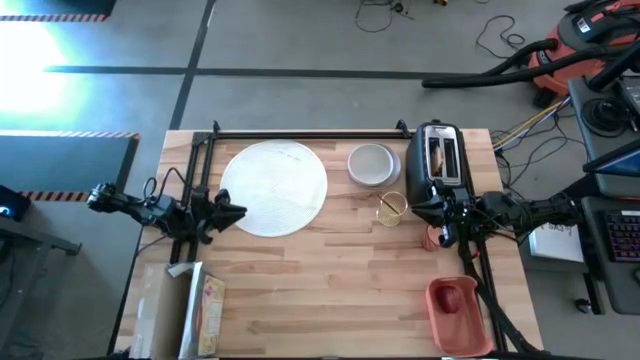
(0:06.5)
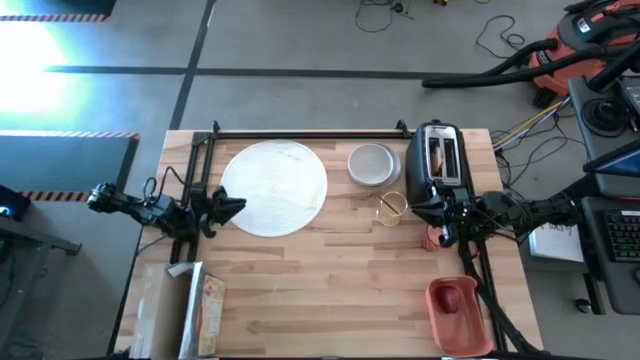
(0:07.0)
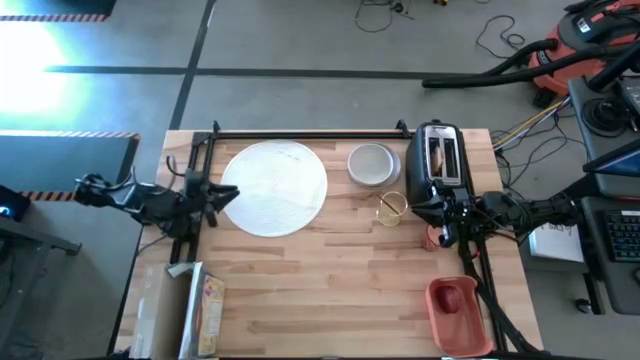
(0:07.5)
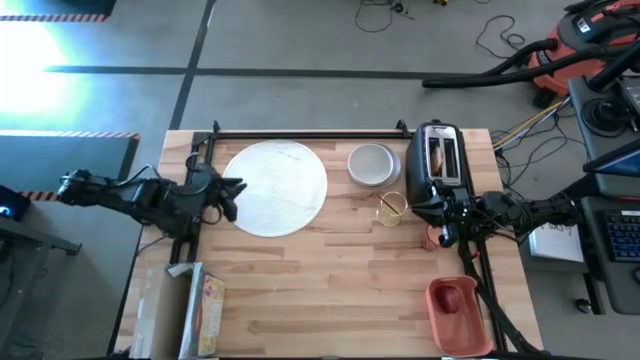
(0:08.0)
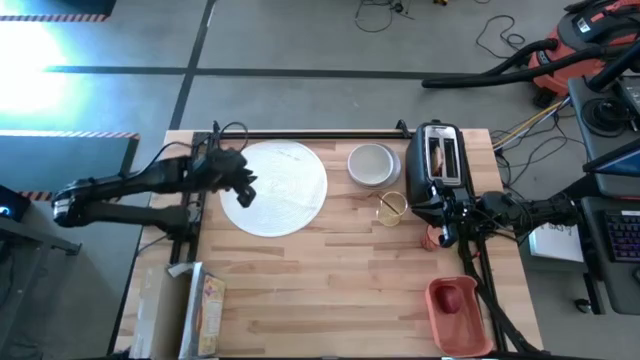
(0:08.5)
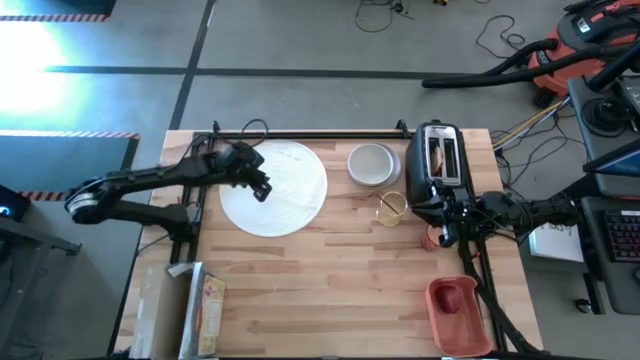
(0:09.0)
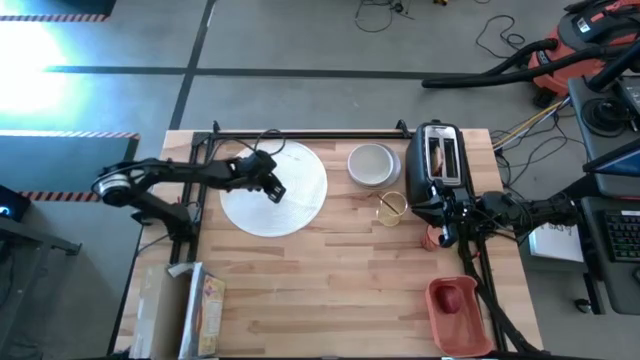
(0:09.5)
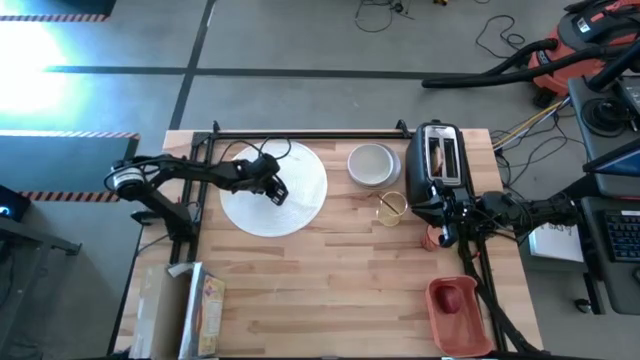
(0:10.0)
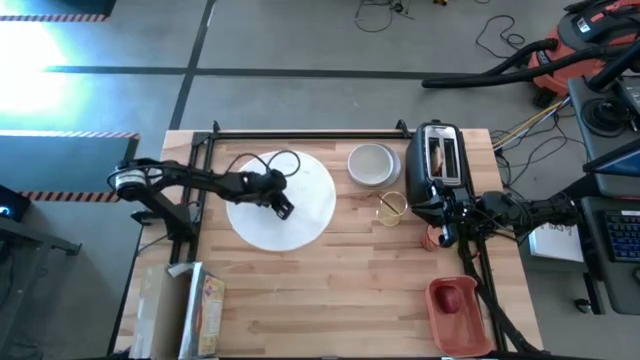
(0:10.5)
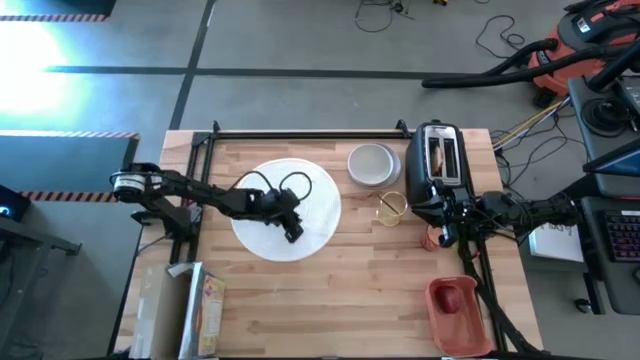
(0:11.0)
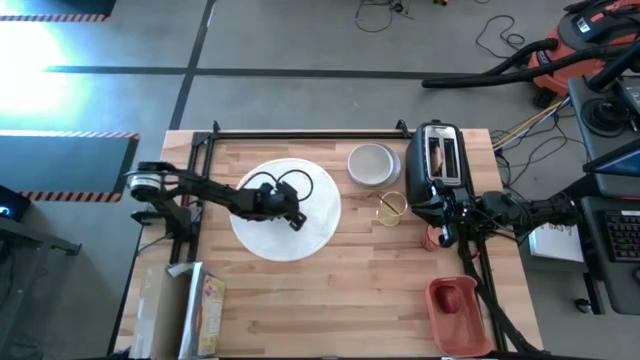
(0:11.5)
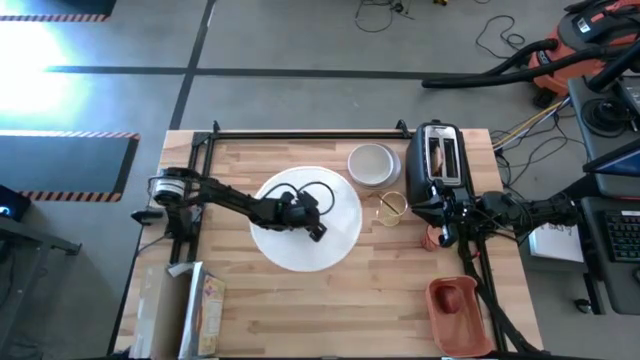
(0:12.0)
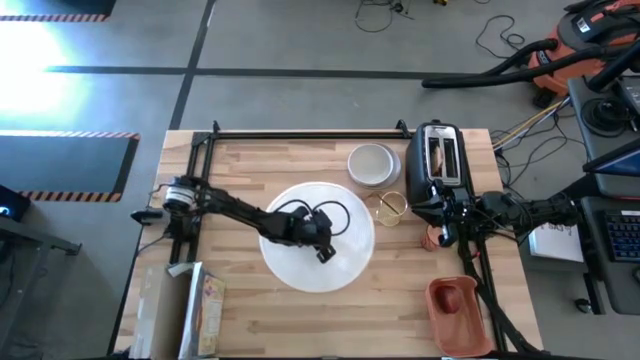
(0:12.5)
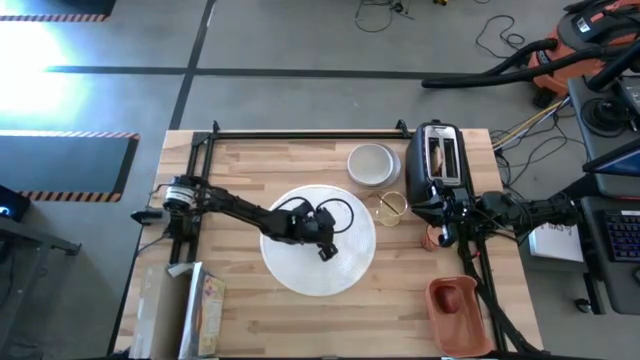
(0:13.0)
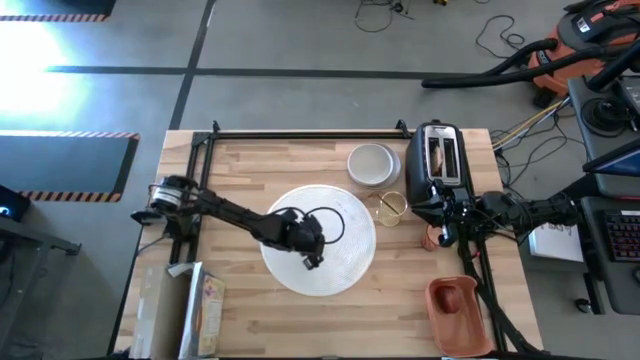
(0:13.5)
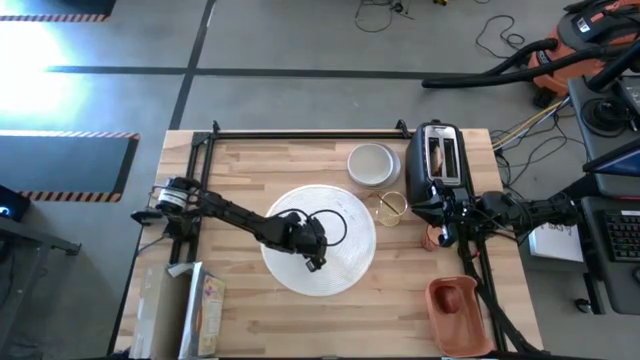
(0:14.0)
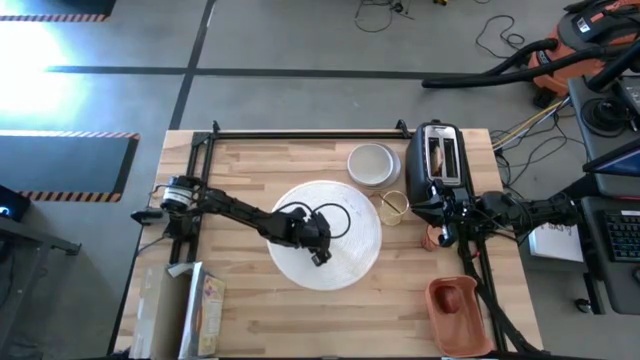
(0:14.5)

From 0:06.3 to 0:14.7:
Task: Arrange a breakfast setting
Move the placemat to the center

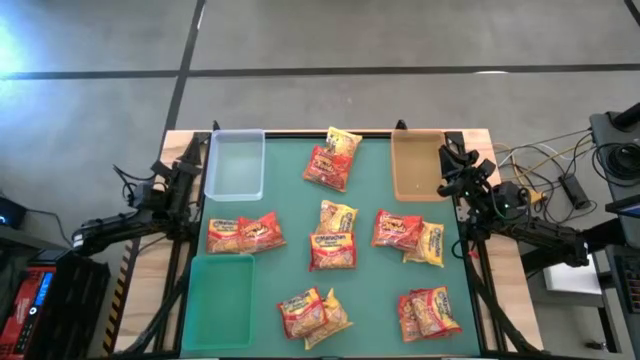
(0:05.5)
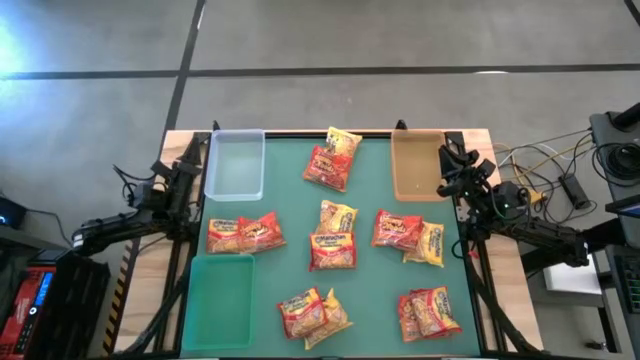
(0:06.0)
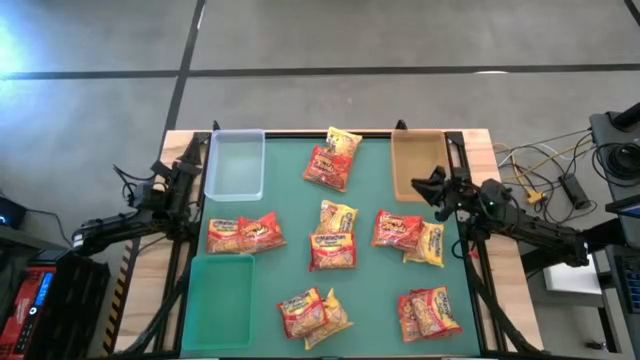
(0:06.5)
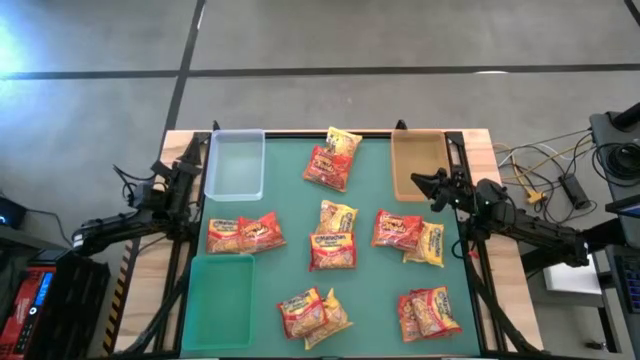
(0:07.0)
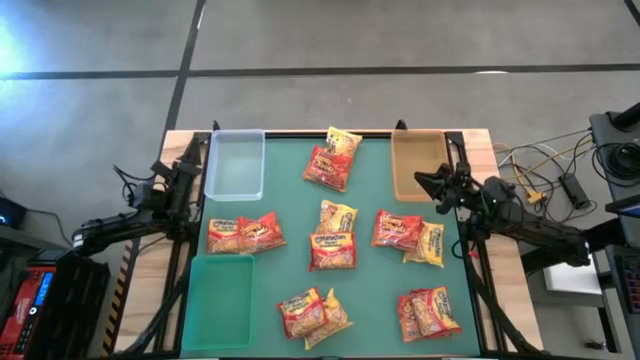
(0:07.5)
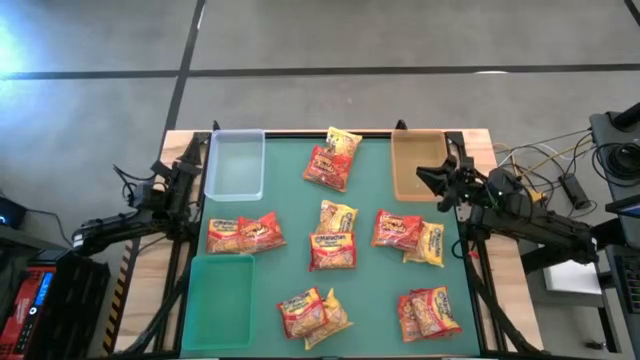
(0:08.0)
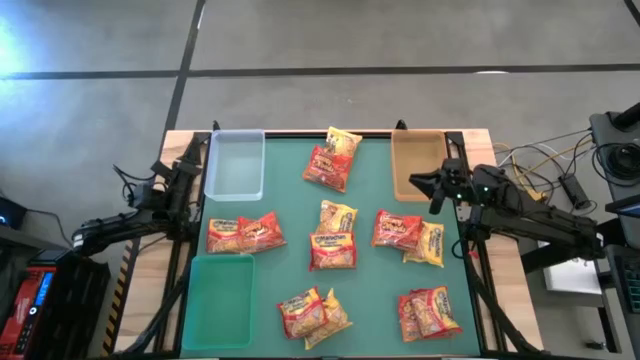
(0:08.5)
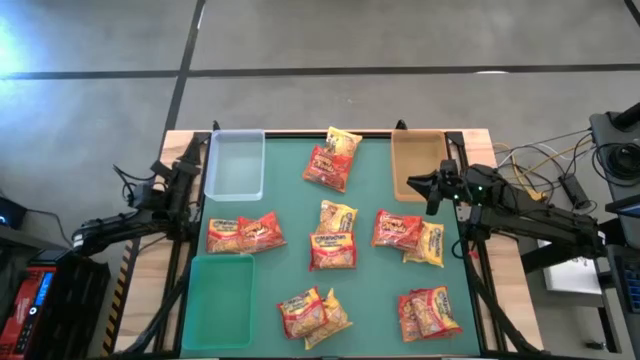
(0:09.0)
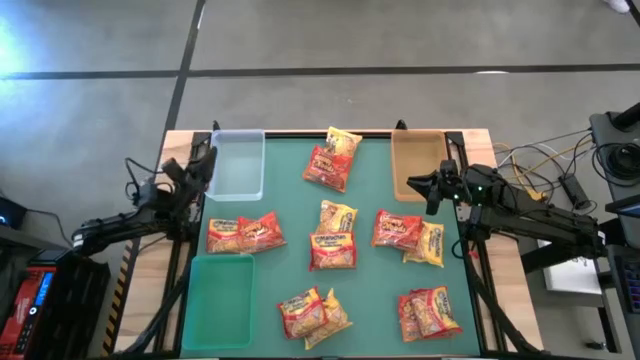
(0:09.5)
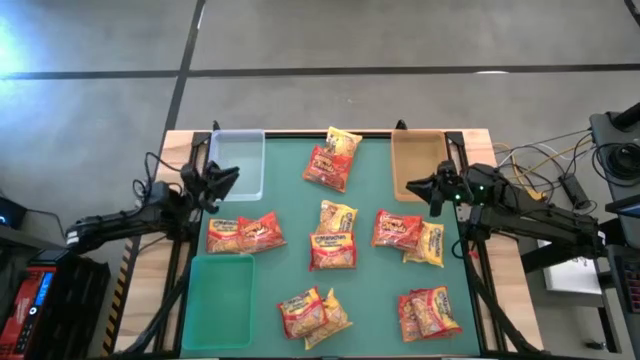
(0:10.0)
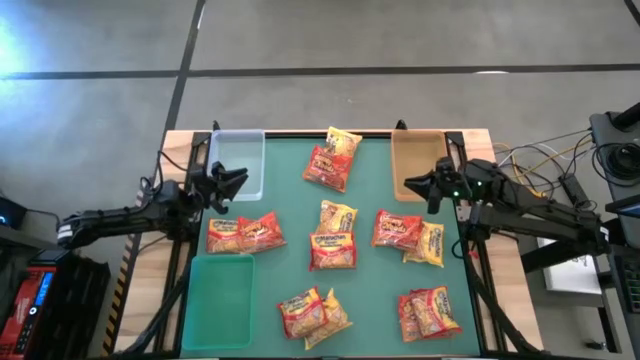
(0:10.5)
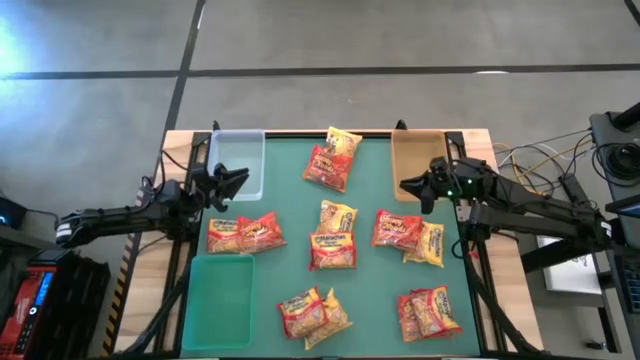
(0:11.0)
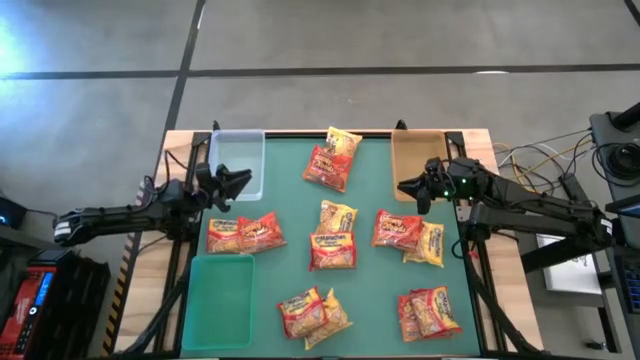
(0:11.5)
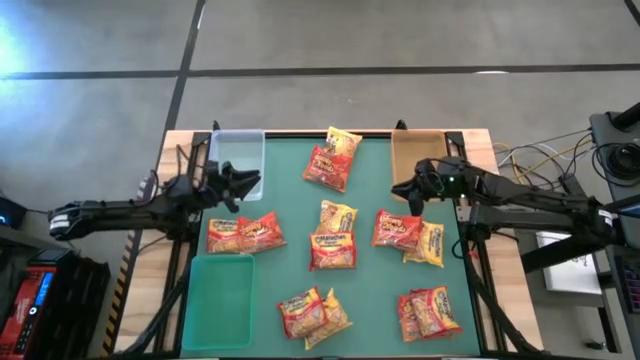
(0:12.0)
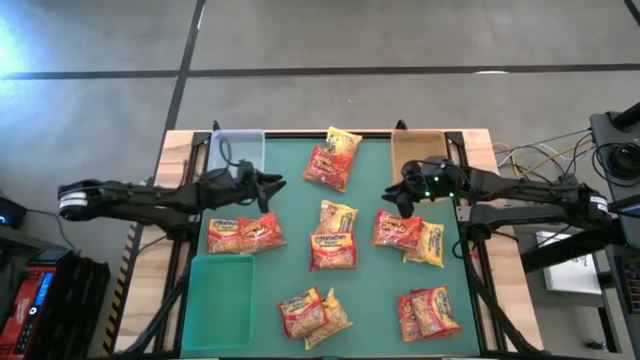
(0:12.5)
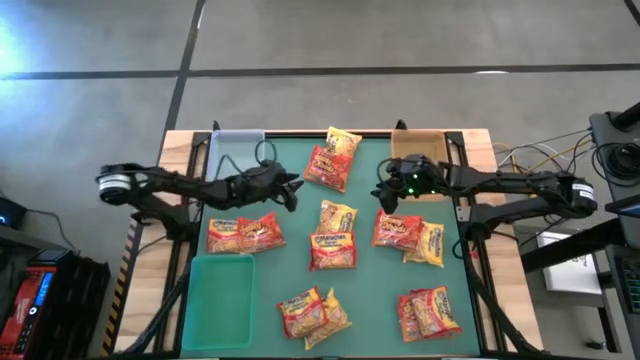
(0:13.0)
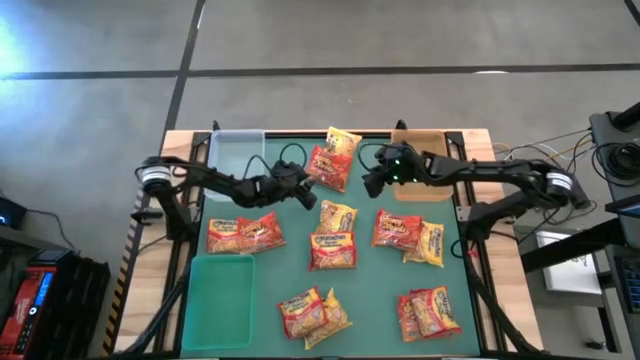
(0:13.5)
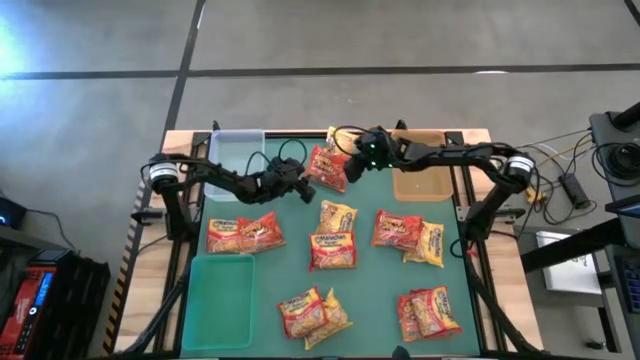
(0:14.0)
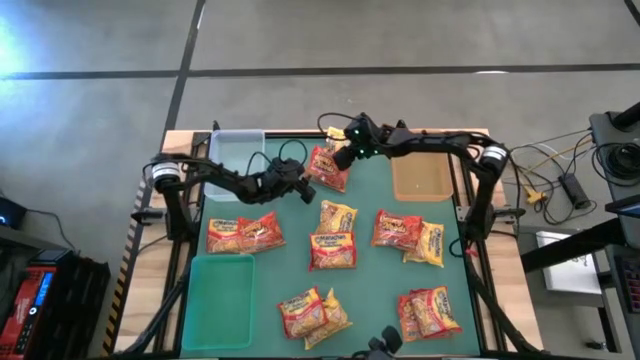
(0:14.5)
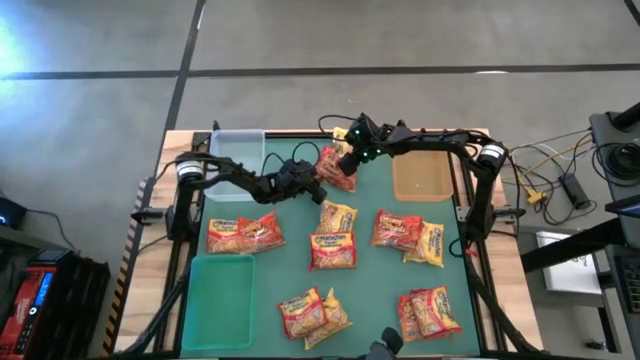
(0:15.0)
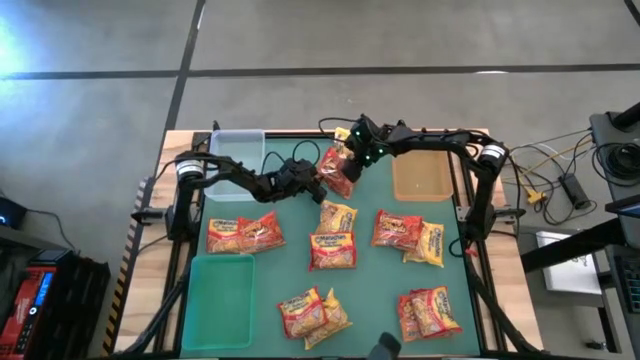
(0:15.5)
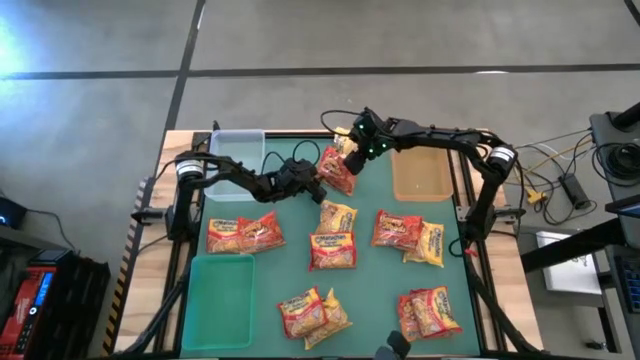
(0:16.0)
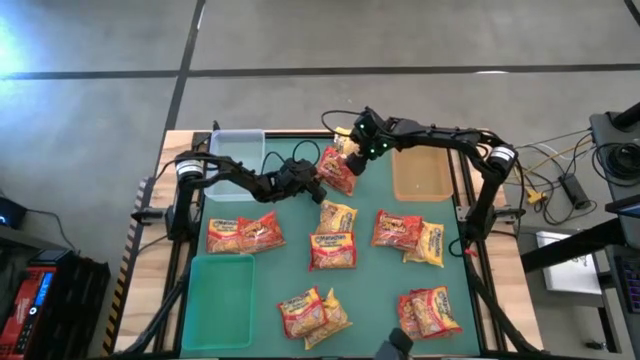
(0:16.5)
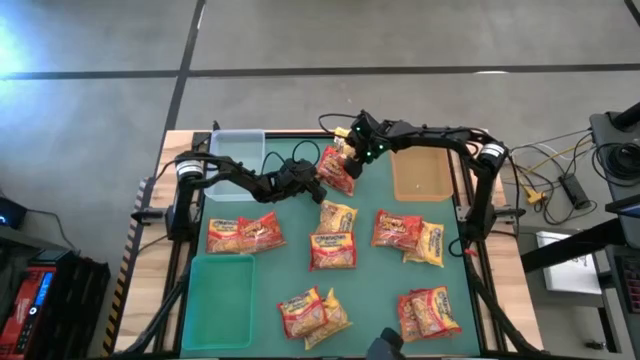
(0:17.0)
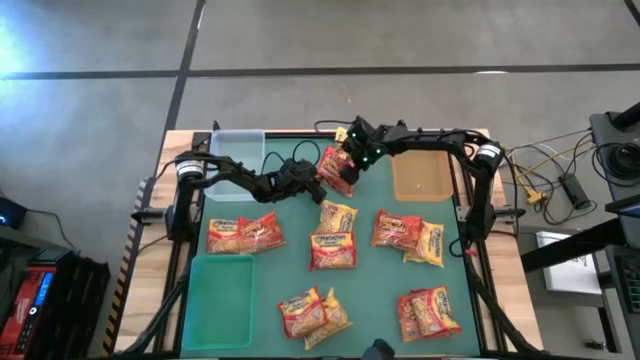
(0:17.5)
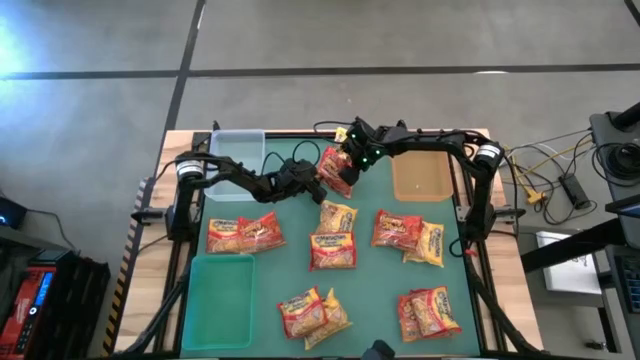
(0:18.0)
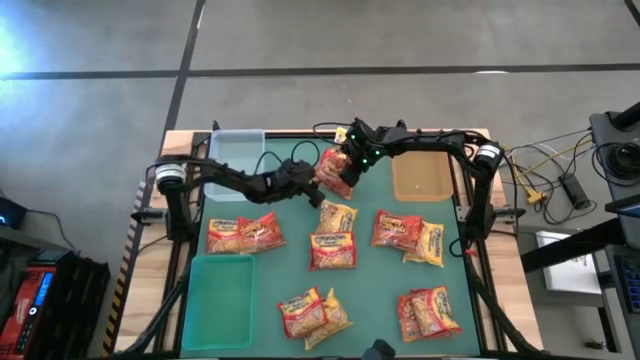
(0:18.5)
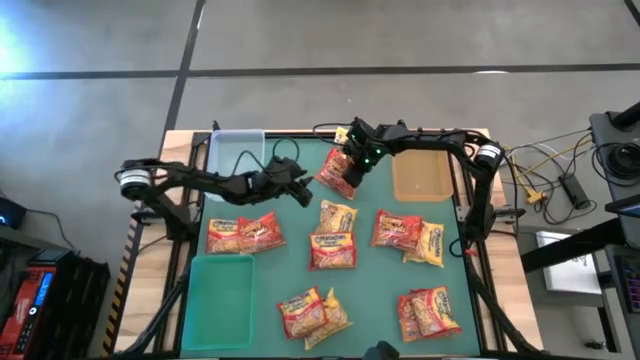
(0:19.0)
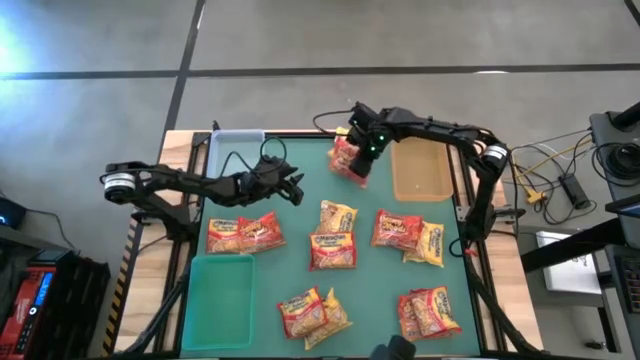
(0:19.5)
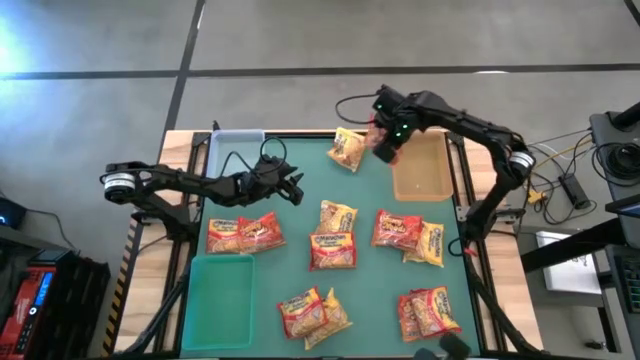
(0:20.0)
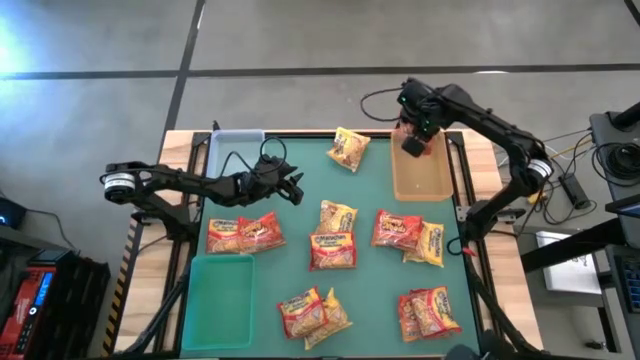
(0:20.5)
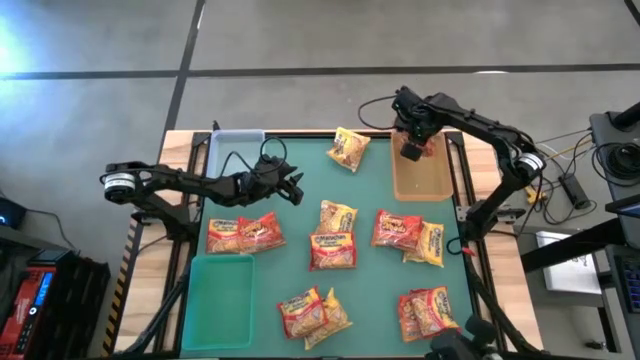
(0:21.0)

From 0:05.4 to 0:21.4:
Task: Sort Maruchan noodles
Put the orange noodle pack into the orange bin
